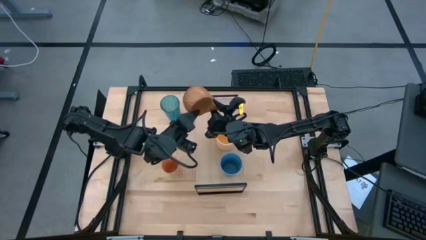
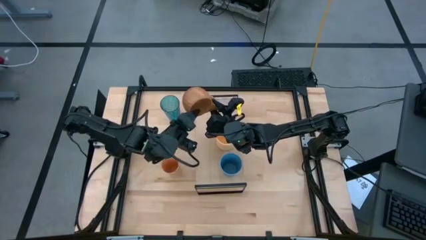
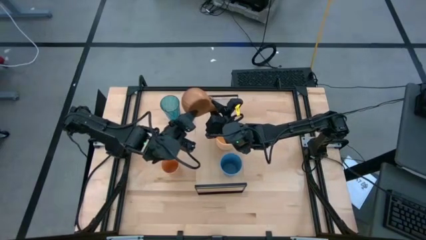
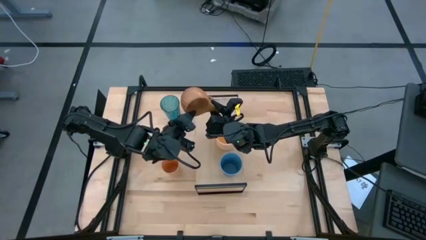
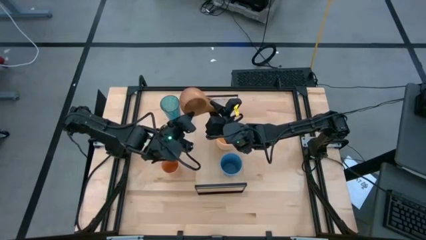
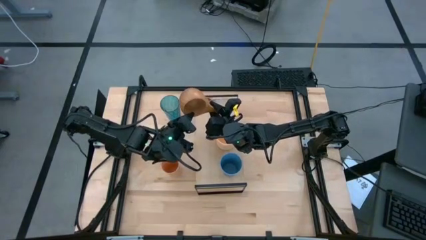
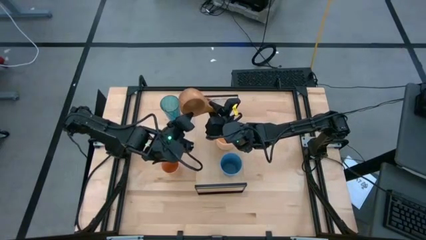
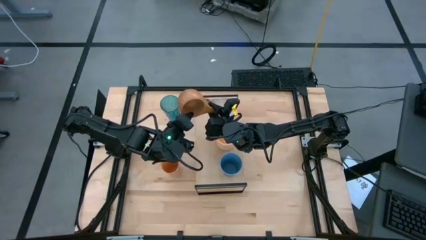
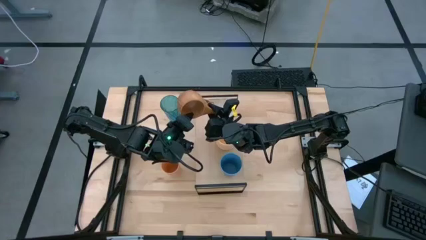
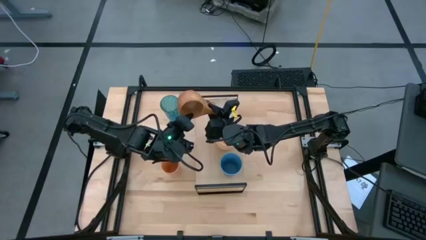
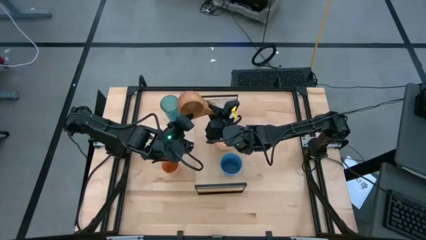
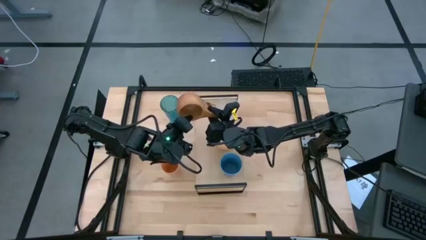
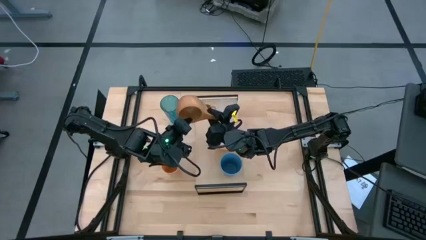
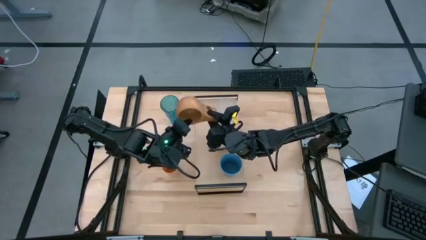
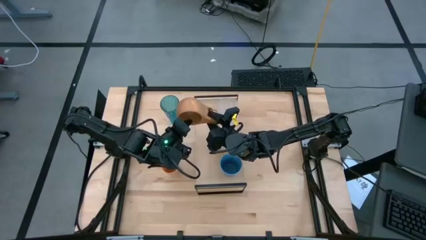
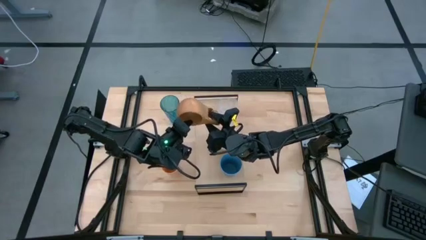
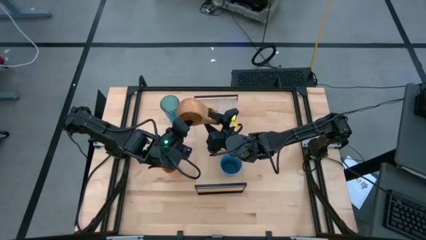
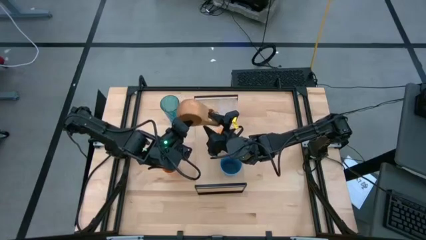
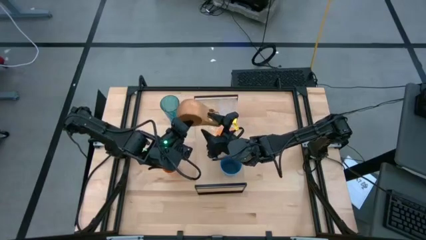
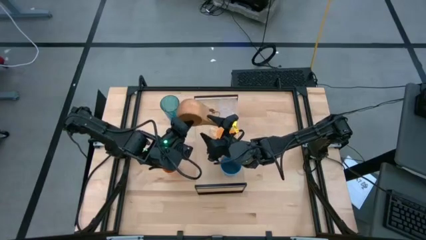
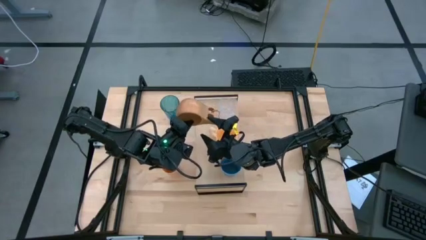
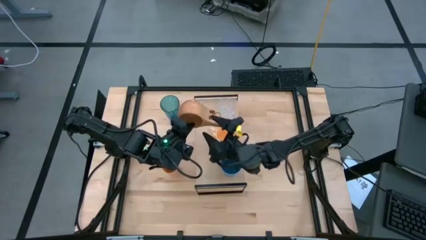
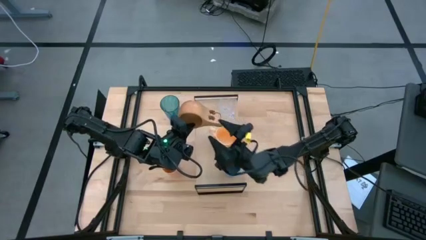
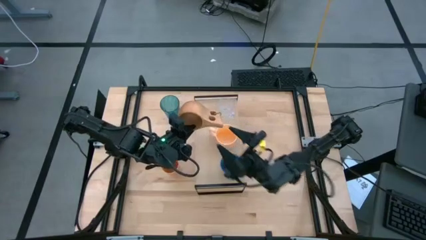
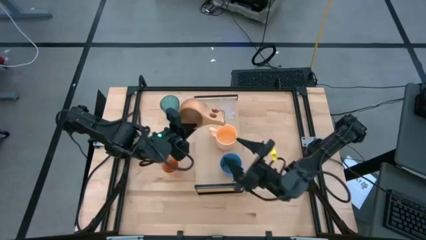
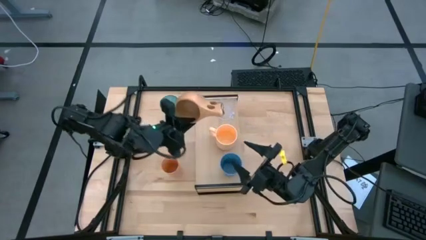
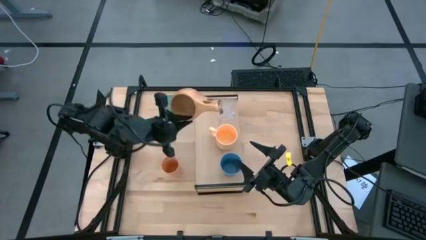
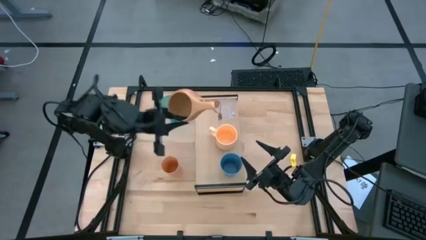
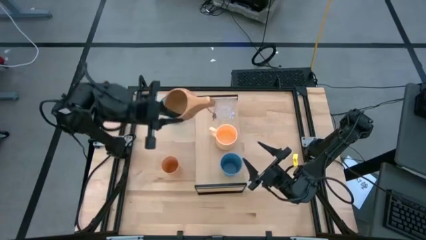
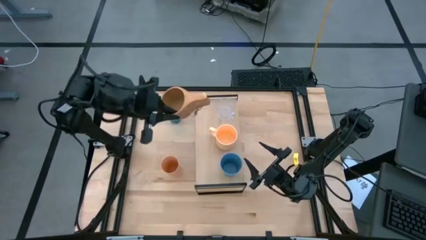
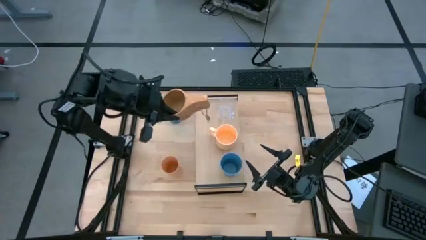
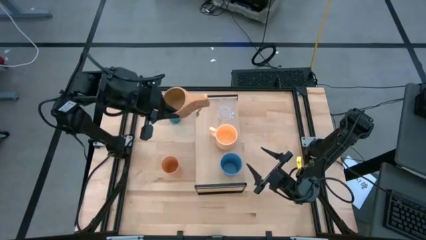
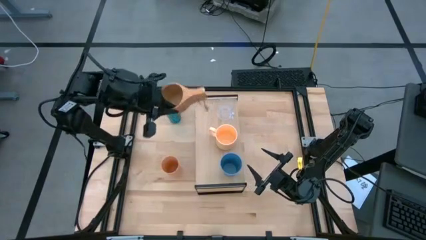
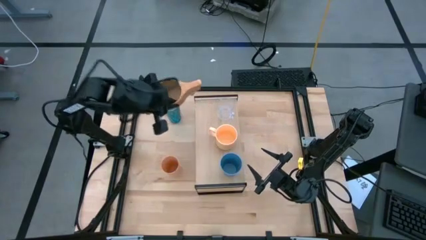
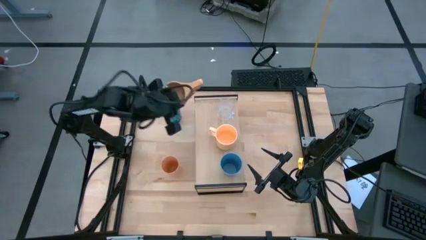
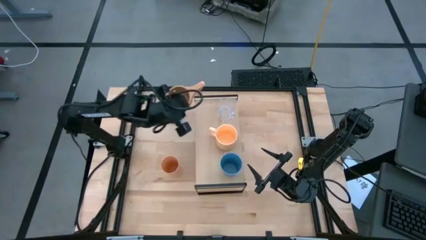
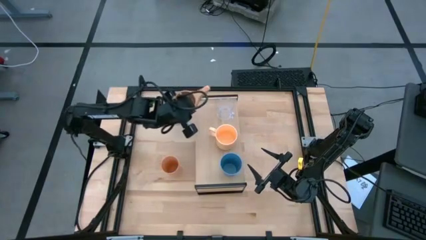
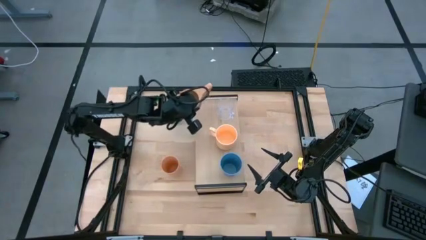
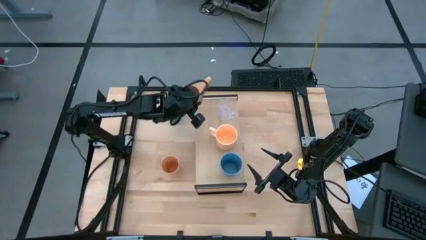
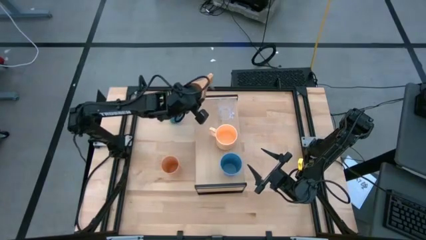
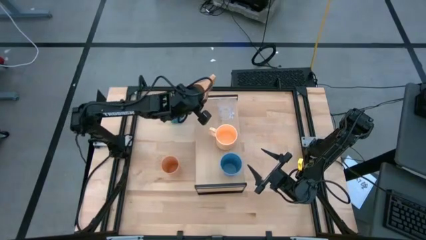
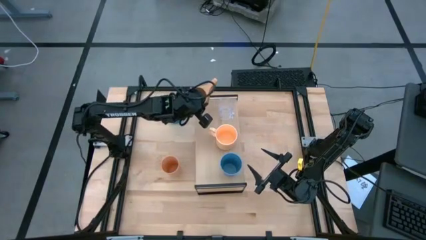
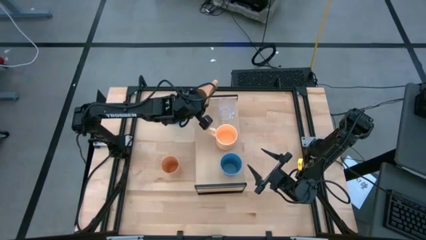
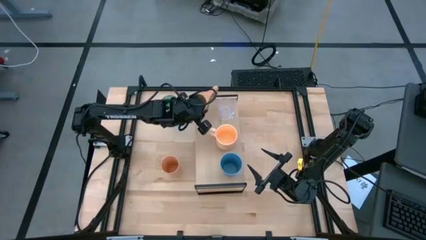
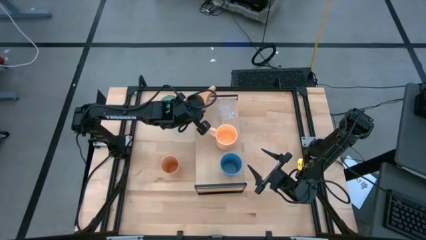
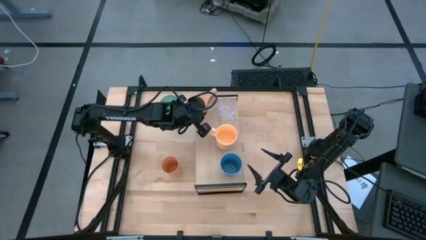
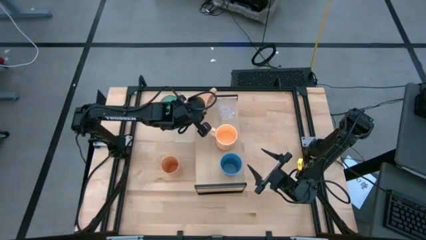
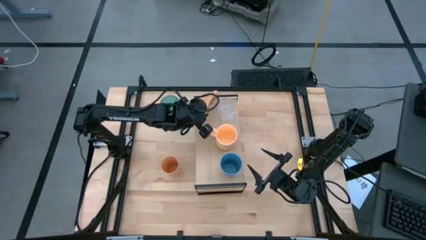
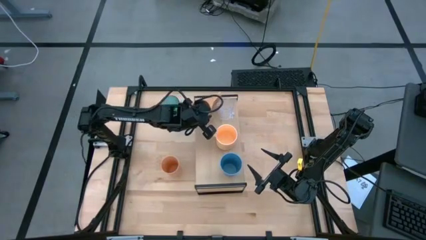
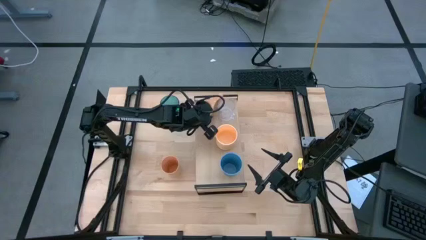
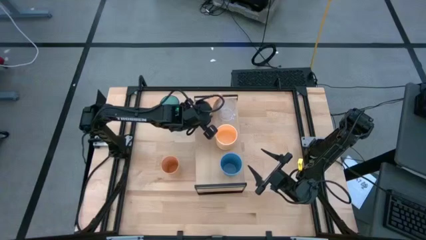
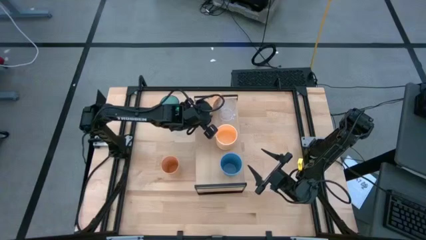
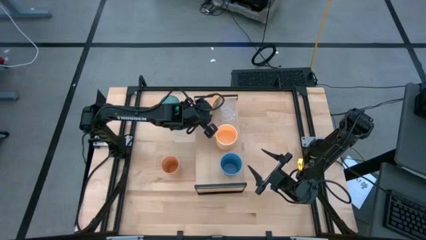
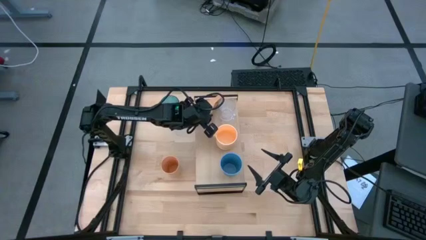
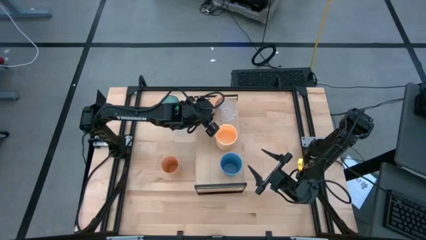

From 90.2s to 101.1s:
Task: Stack small to large cups/mugs on shelf
Put the brown cup on the shelf

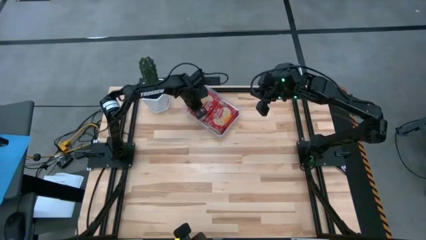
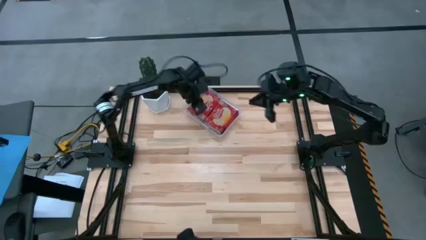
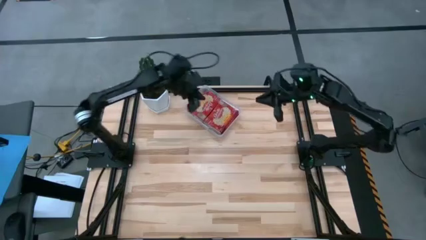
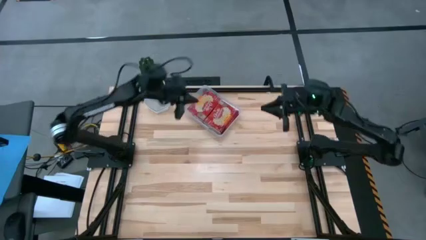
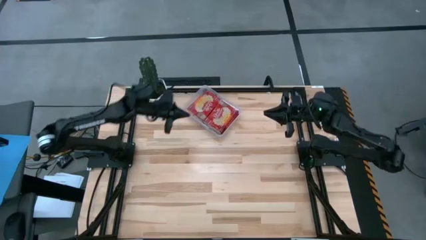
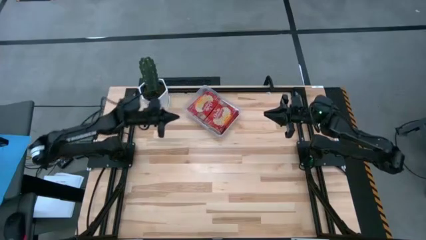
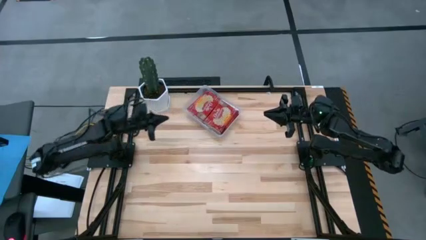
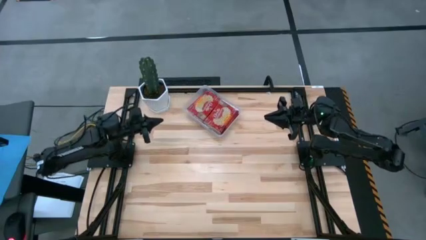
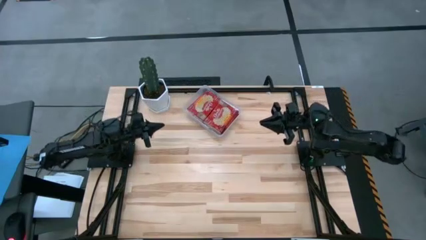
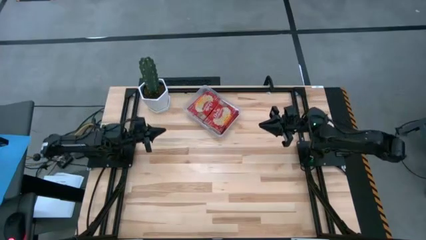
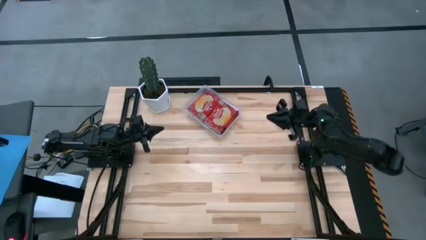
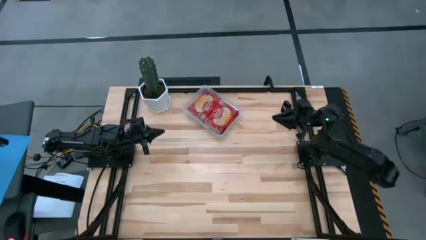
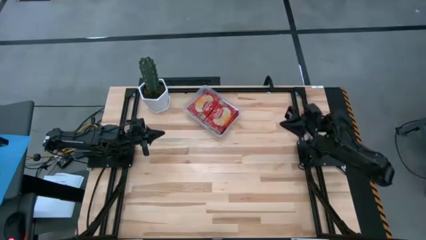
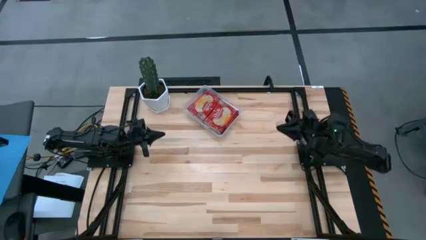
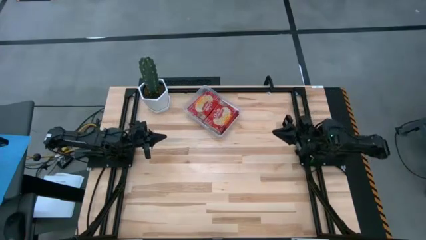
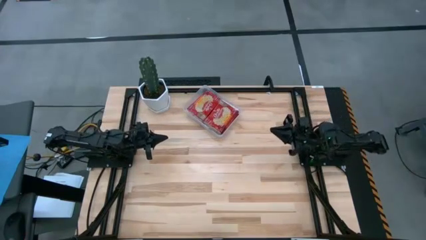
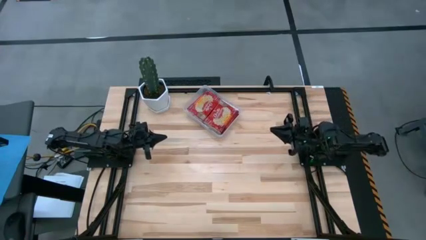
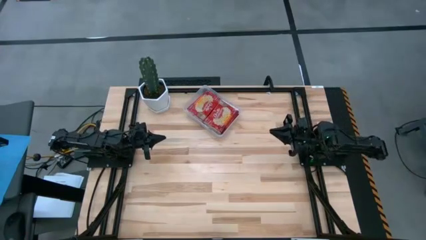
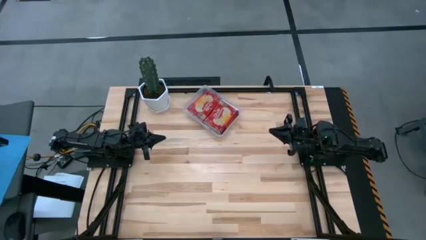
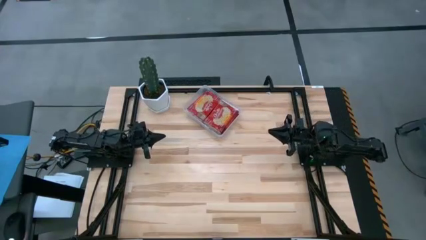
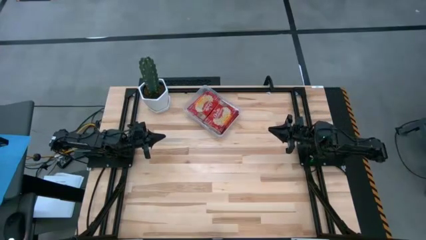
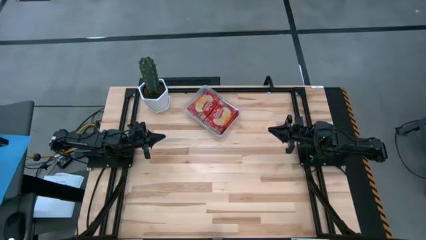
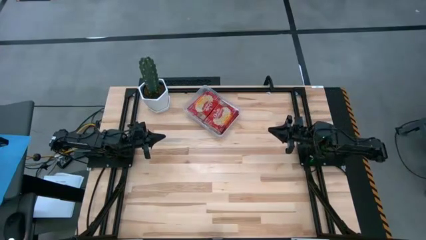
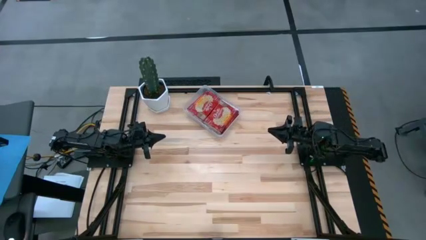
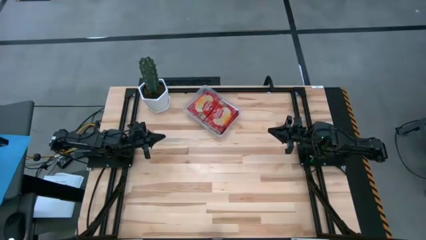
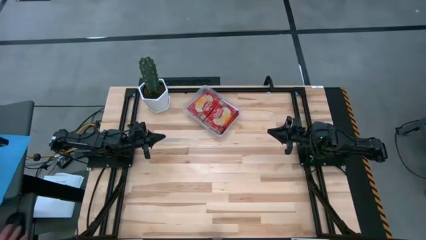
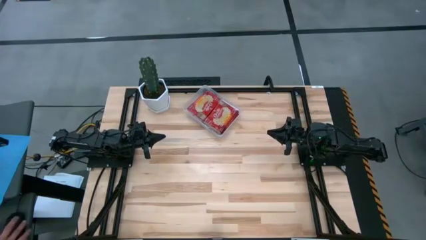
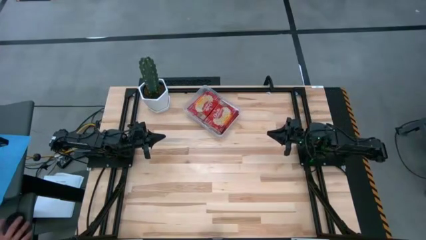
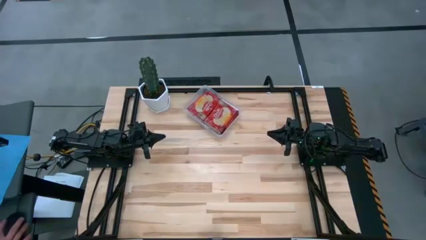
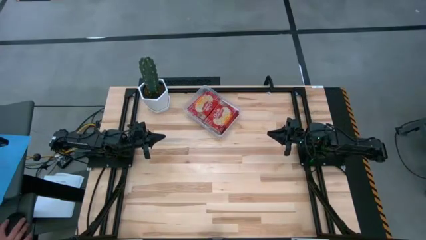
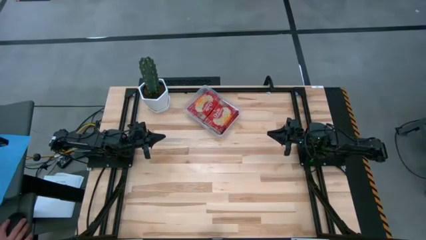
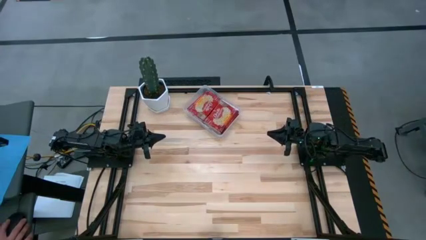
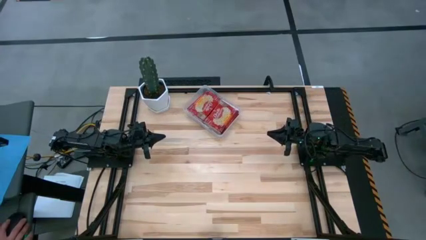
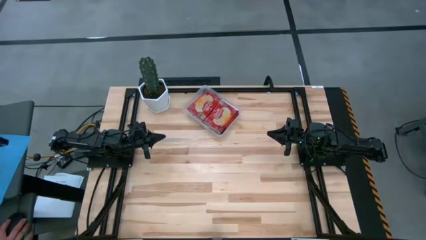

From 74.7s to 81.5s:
Task: Sort popcorn bags into baskets
Return to Home Position
